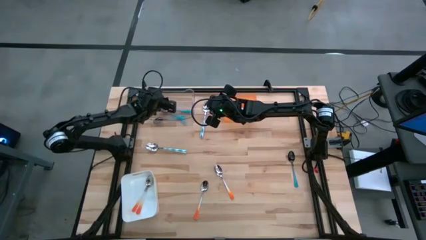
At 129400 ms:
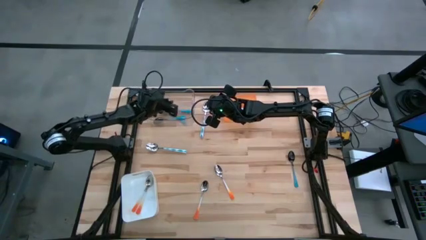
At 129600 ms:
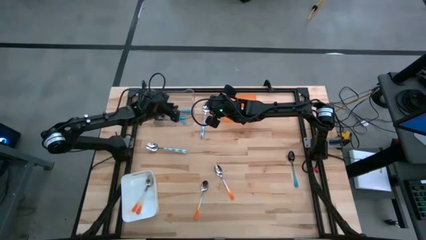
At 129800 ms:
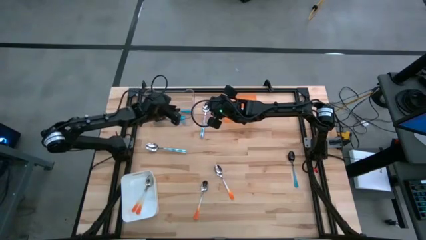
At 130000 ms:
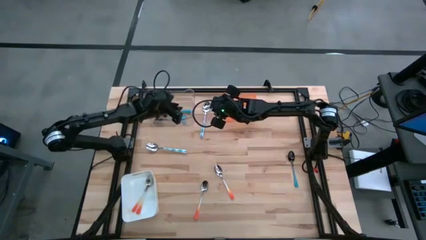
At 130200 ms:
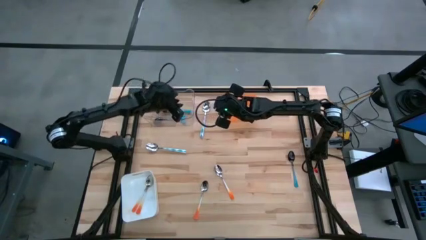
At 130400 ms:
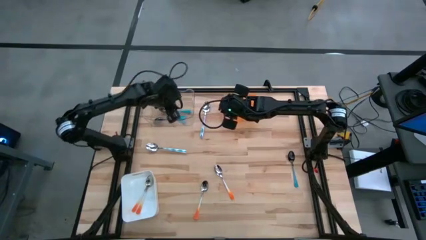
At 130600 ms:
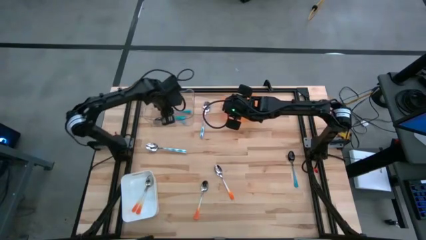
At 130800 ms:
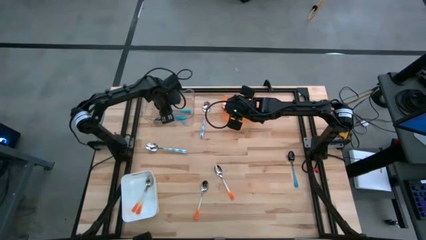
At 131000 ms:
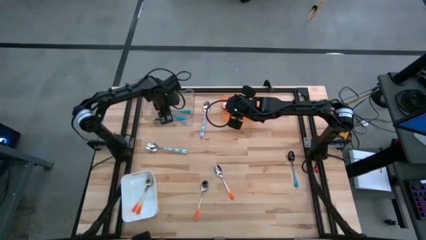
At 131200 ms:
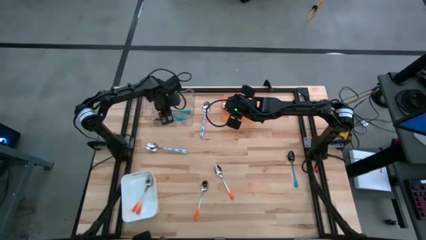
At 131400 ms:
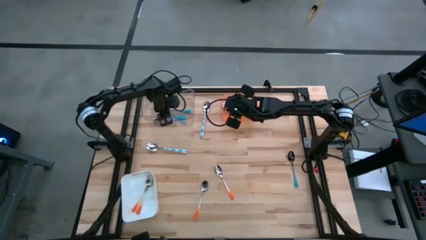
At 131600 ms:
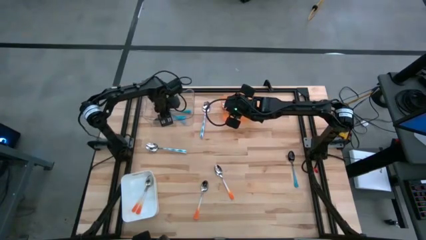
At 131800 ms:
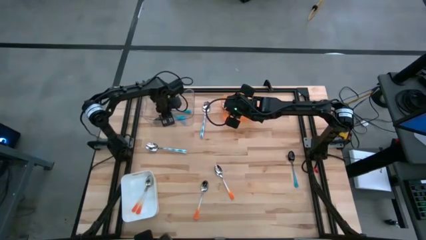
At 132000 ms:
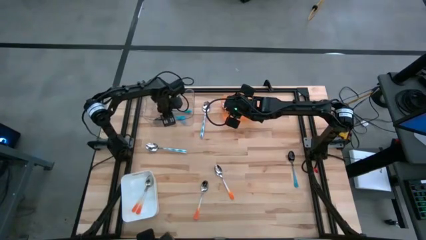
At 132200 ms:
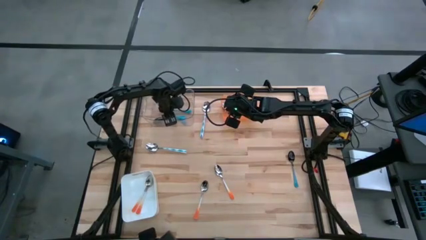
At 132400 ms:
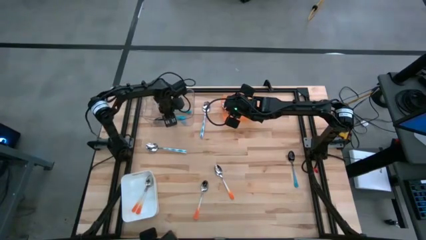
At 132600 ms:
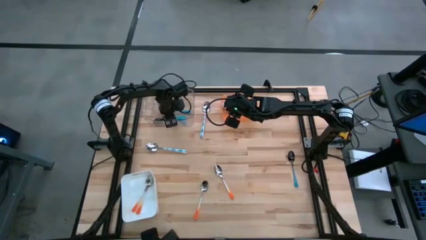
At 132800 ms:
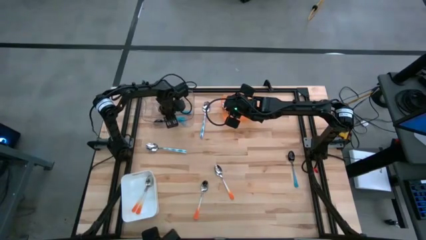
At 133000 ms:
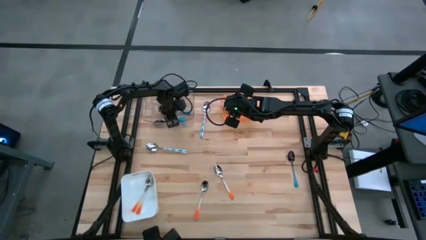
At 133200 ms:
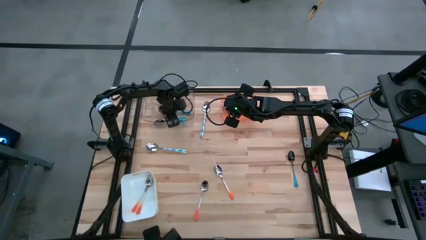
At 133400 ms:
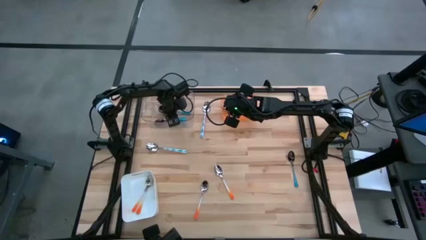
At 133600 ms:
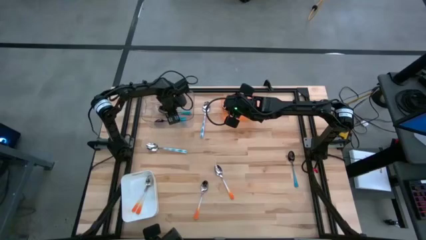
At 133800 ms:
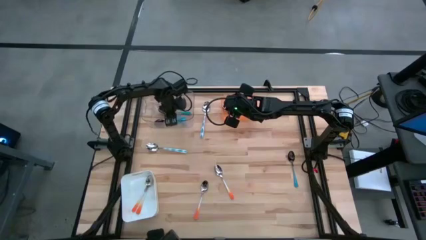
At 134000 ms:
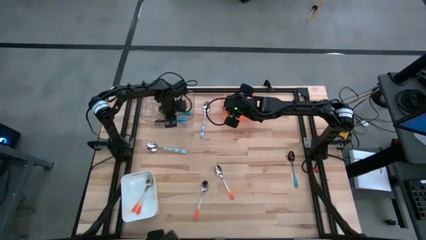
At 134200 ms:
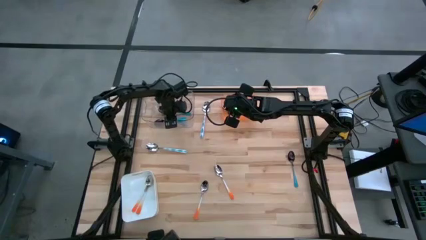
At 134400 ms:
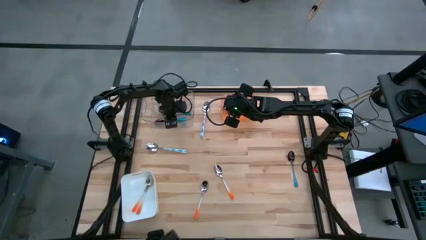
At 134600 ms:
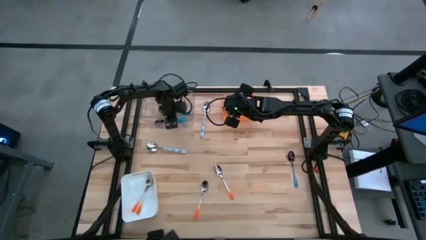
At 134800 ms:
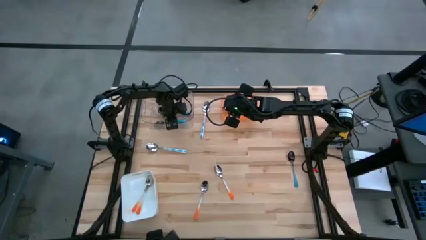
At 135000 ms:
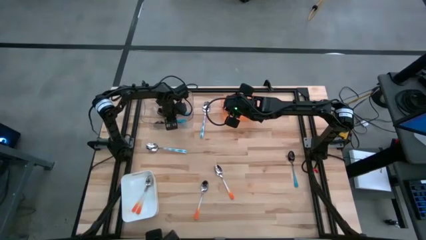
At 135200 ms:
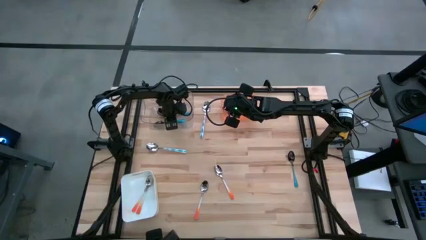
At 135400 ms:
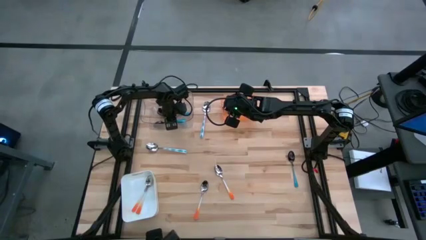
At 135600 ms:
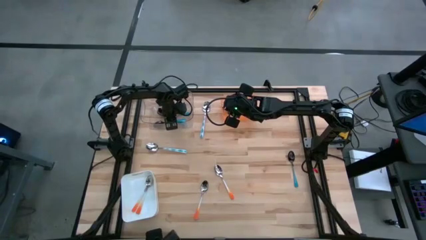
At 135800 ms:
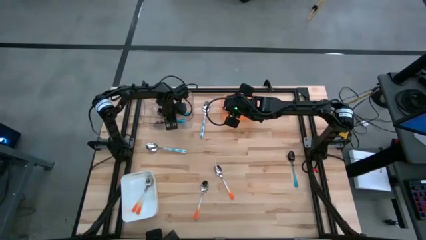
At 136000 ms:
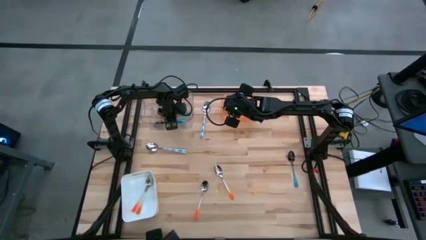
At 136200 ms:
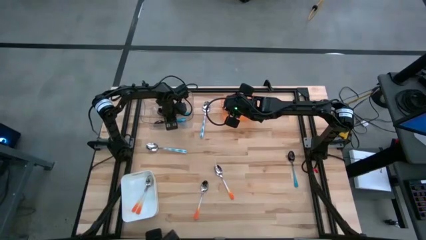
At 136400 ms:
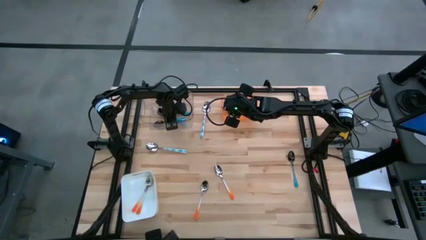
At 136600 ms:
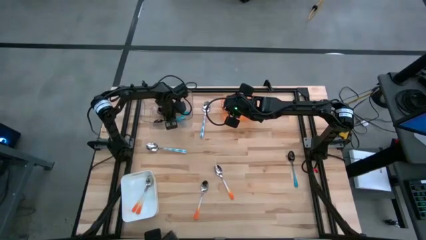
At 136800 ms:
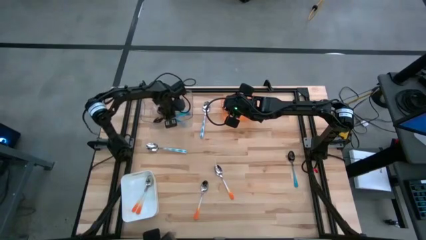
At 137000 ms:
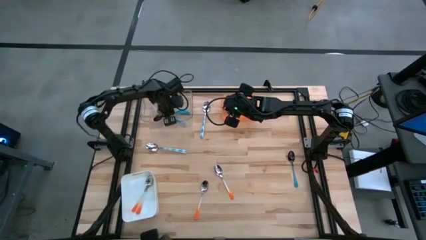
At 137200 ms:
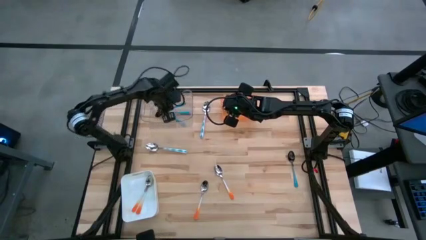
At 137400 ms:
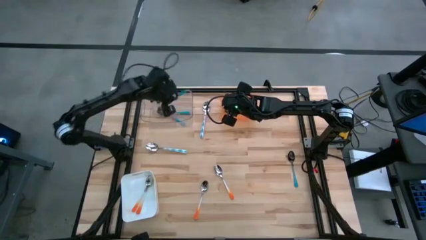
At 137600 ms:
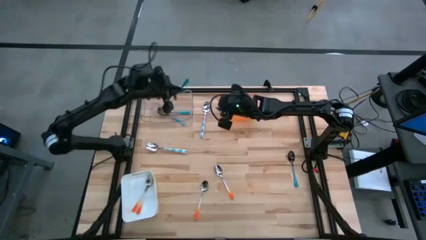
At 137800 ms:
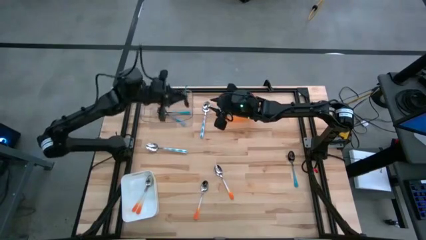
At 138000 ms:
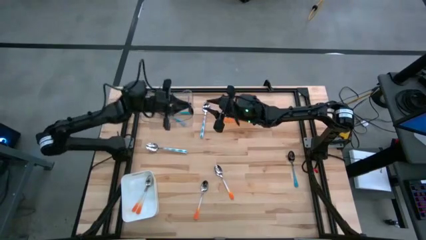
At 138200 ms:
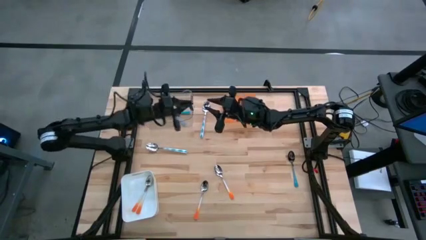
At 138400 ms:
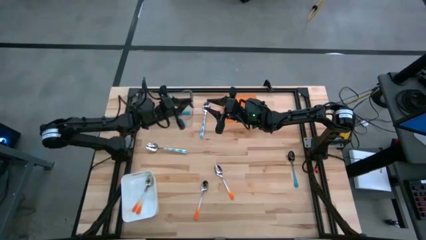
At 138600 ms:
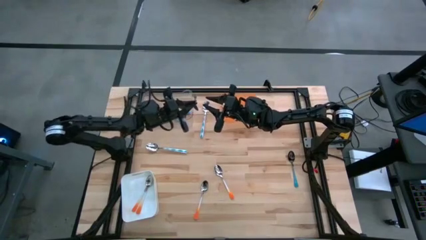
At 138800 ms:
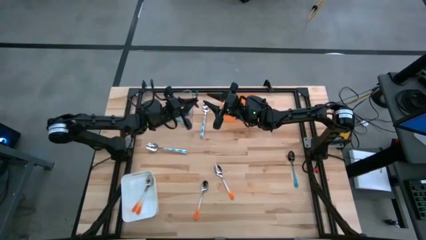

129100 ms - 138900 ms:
Task: Sort silverware by color (type)
Adjust the blue spoon in the transparent bin

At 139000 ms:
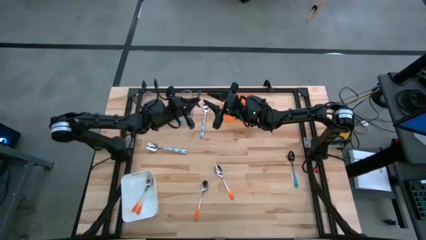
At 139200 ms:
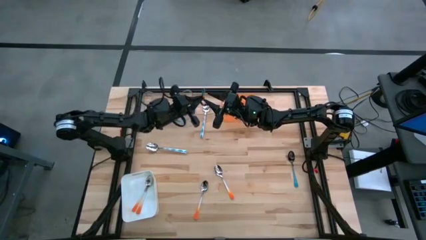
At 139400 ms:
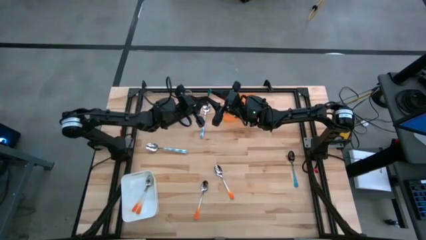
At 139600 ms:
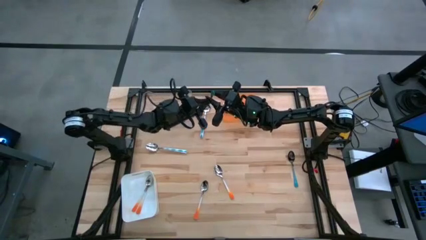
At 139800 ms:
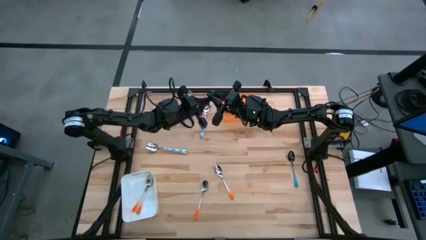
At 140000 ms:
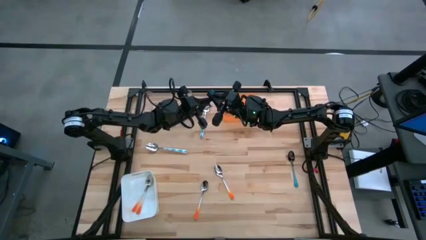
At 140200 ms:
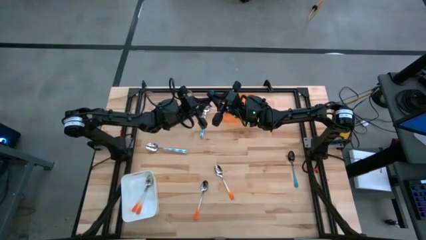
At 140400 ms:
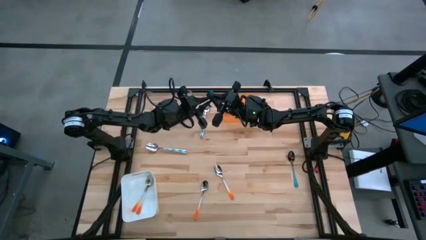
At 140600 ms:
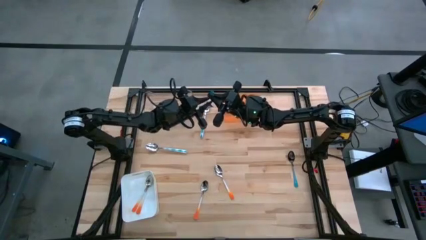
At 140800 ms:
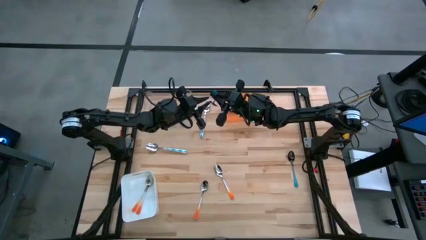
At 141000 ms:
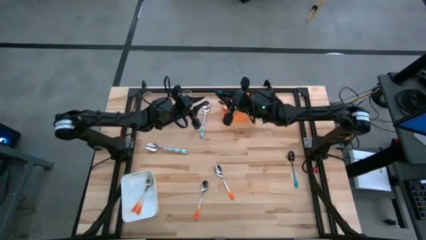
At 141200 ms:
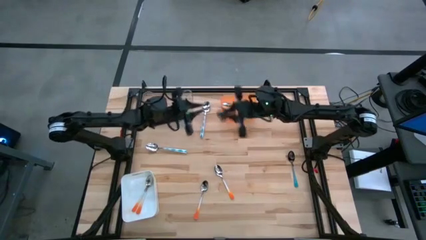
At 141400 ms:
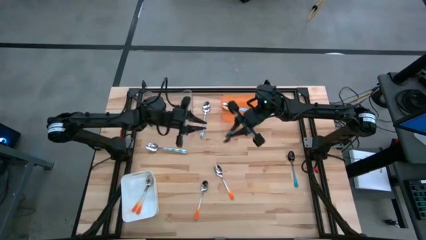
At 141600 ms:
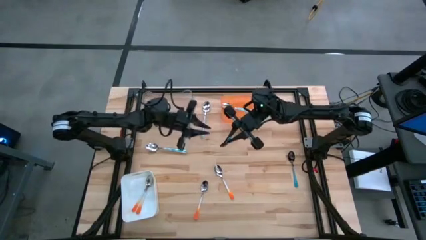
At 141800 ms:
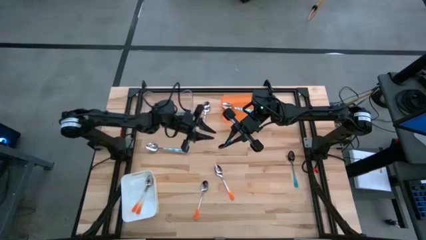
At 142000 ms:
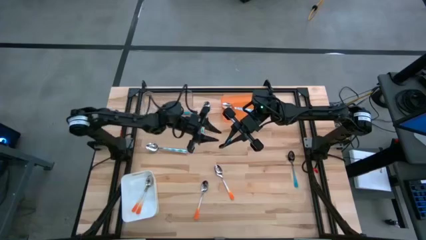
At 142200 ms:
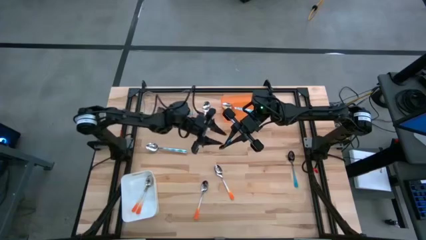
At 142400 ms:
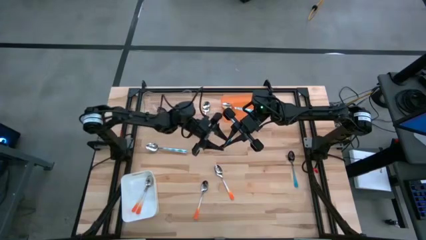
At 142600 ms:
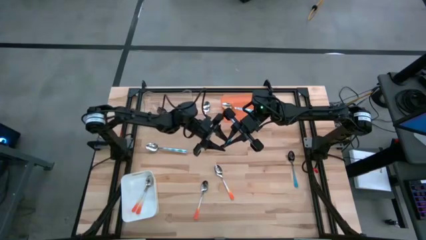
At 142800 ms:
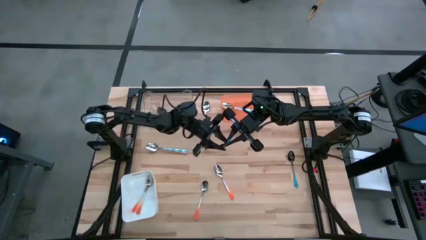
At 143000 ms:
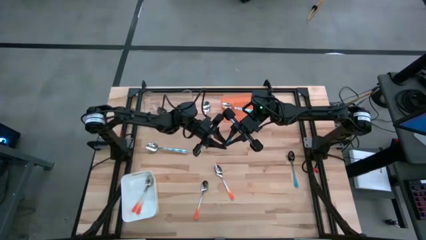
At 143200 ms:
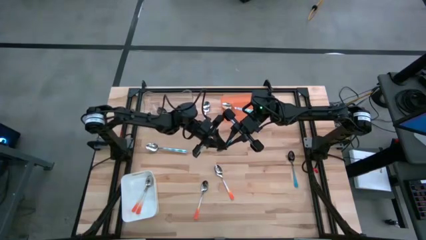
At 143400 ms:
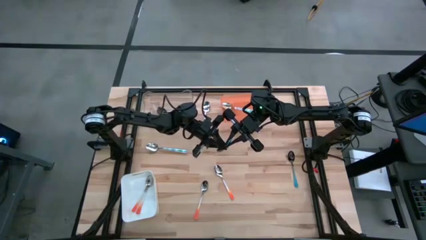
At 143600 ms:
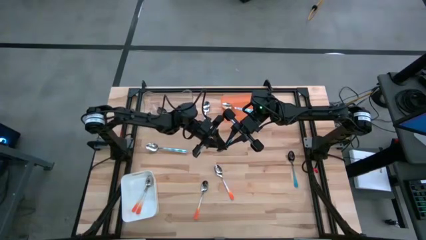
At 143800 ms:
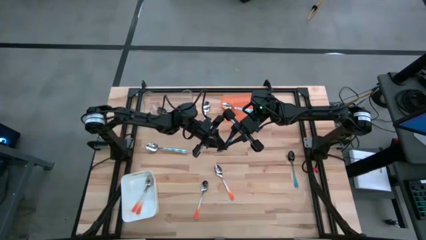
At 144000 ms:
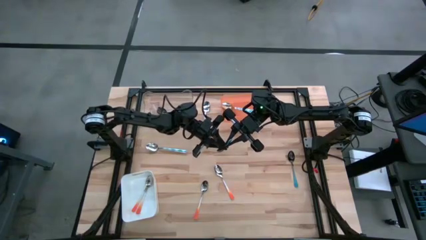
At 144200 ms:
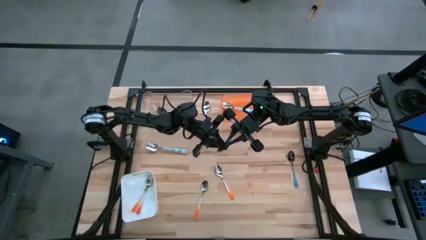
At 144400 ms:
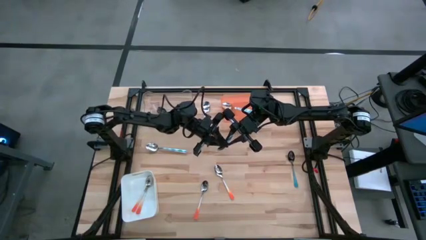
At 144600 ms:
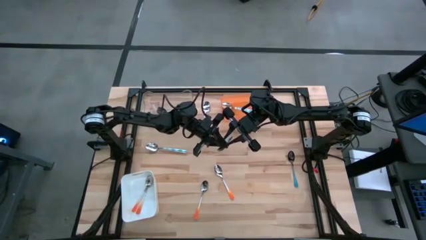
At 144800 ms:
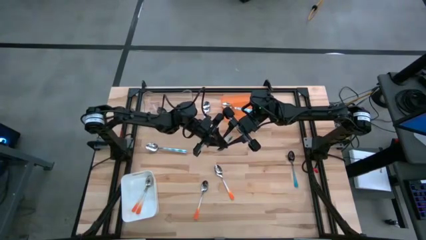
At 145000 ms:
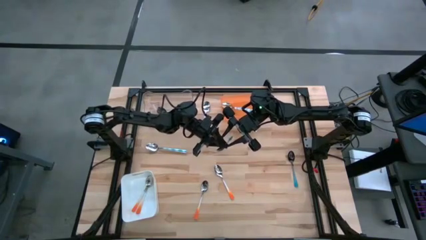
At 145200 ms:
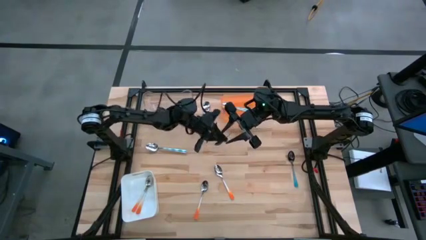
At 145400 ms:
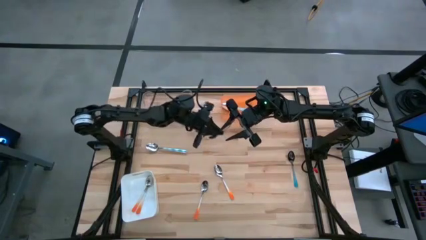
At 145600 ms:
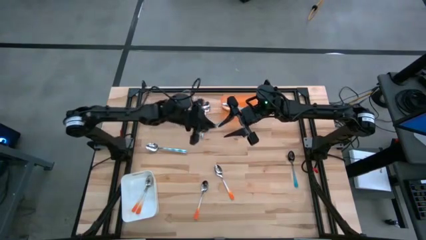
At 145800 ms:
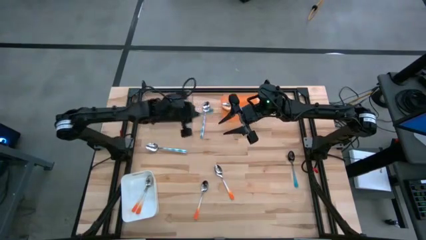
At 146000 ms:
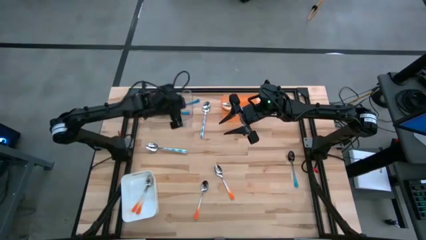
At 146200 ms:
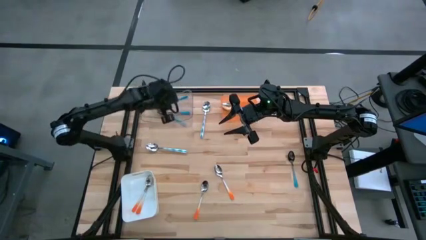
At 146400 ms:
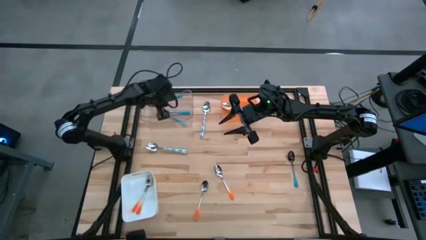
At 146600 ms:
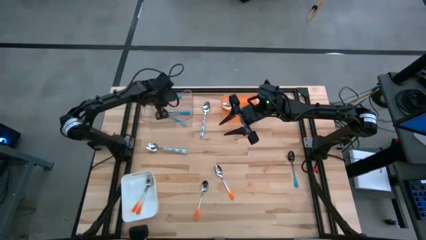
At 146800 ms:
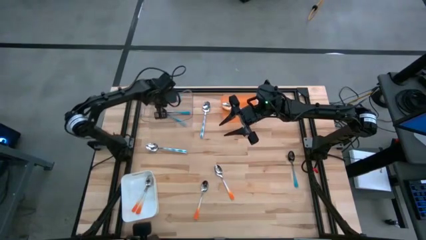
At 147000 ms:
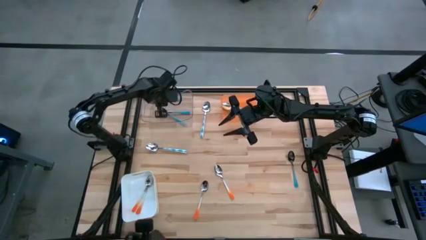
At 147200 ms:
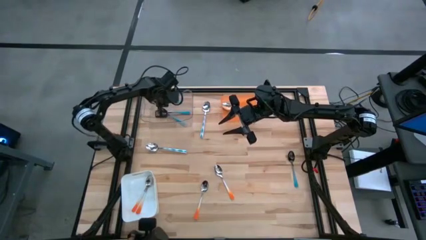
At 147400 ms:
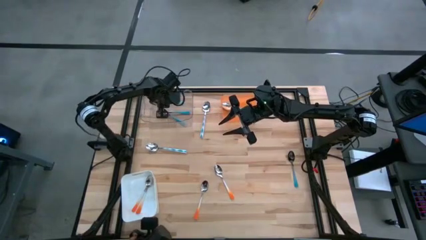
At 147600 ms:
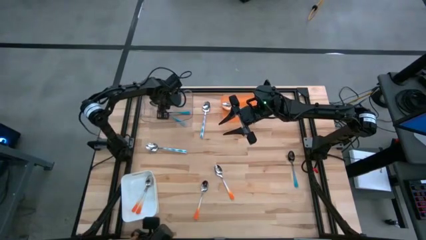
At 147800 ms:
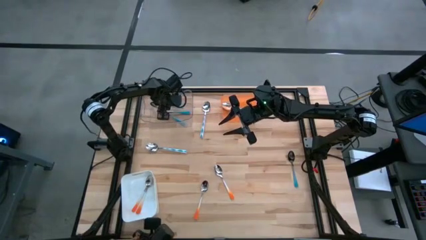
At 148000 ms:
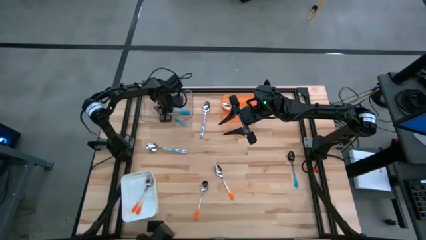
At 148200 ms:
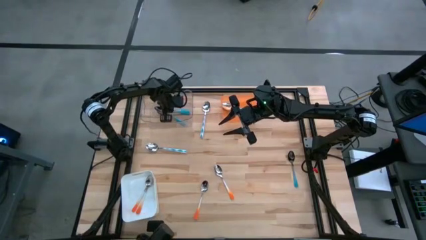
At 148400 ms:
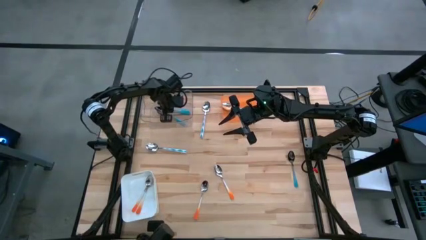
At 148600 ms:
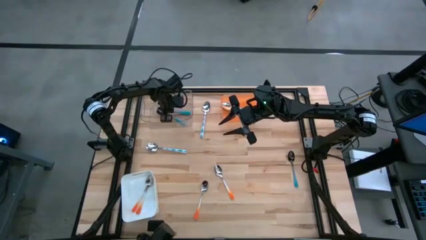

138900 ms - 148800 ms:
Adjust the blue spoon in the transparent bin
